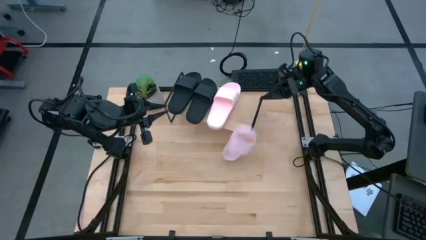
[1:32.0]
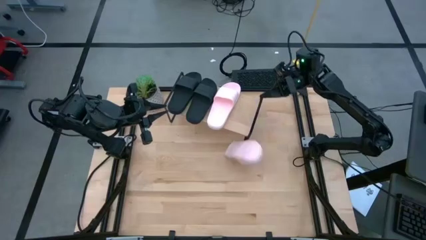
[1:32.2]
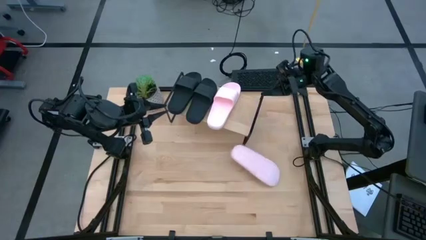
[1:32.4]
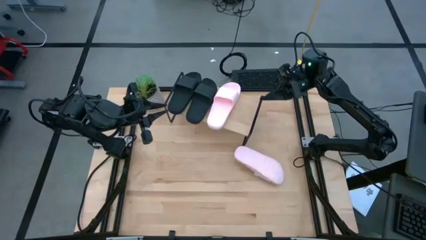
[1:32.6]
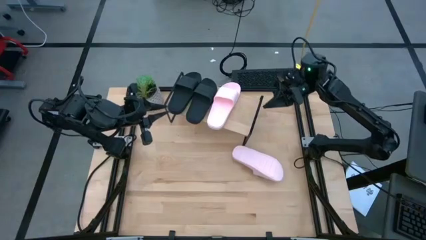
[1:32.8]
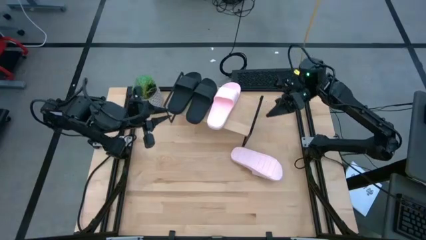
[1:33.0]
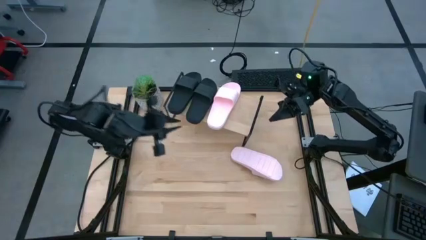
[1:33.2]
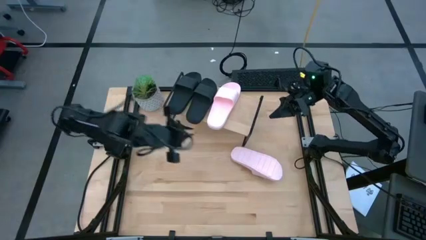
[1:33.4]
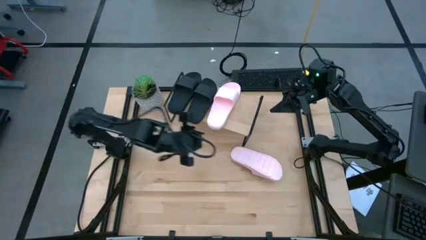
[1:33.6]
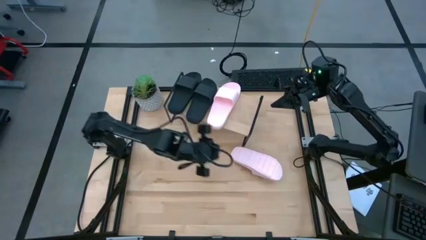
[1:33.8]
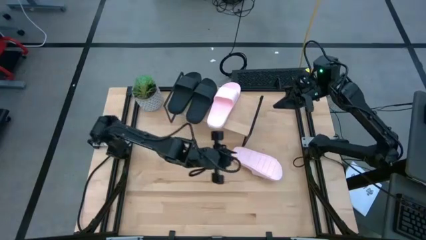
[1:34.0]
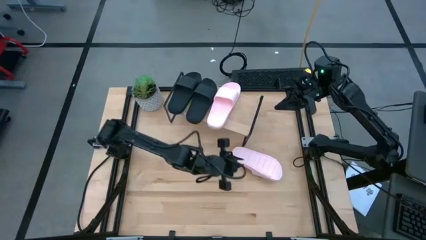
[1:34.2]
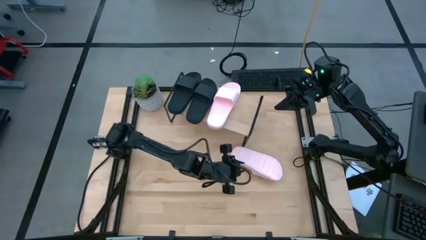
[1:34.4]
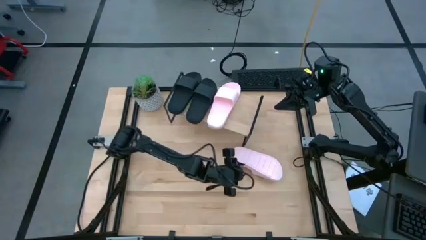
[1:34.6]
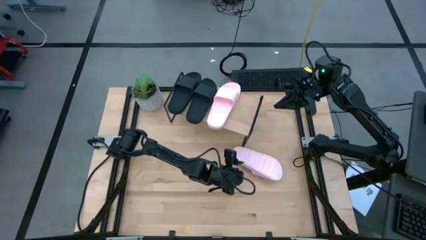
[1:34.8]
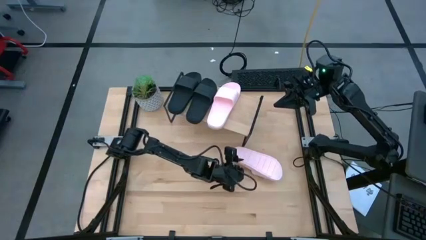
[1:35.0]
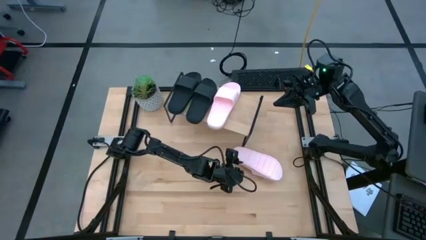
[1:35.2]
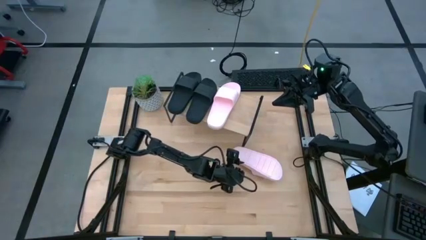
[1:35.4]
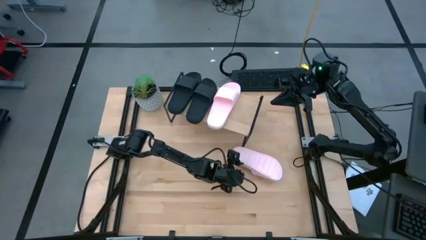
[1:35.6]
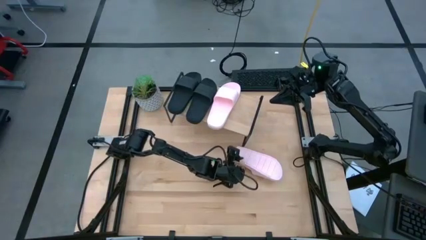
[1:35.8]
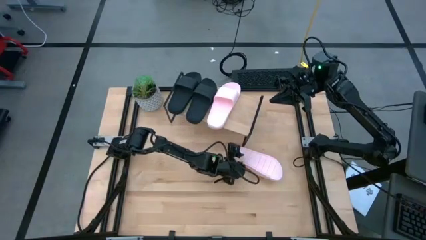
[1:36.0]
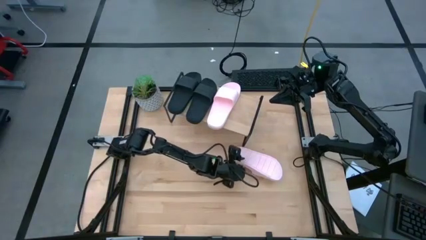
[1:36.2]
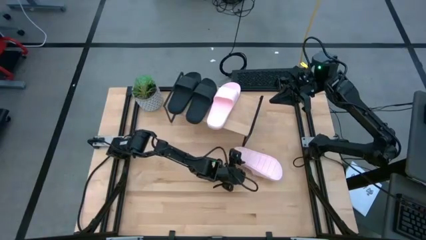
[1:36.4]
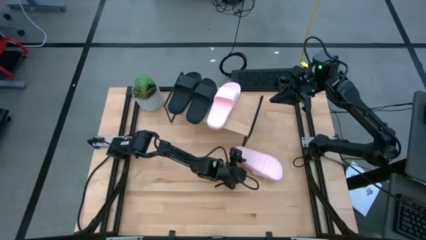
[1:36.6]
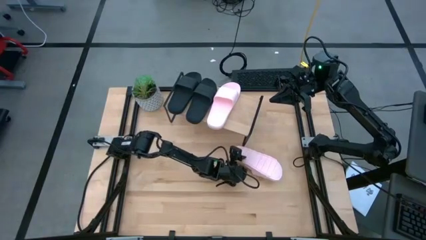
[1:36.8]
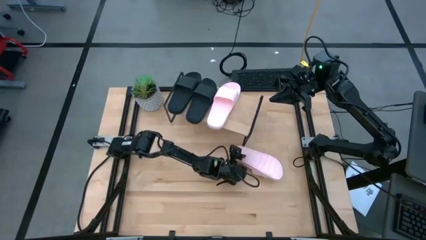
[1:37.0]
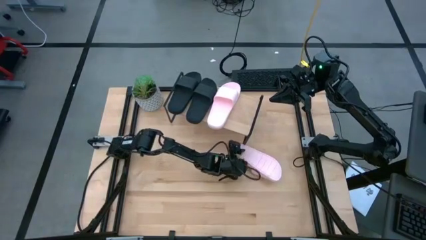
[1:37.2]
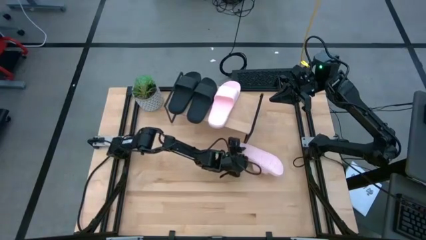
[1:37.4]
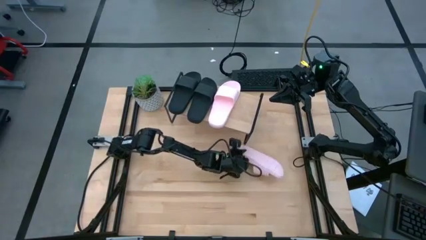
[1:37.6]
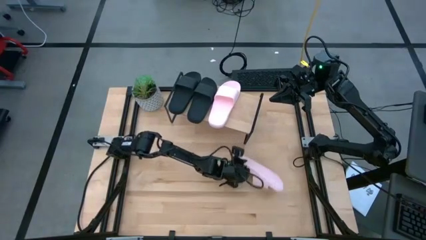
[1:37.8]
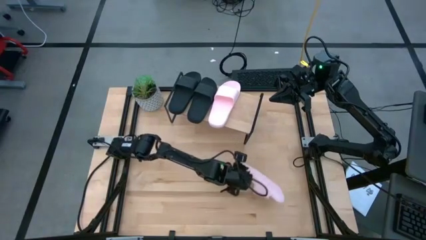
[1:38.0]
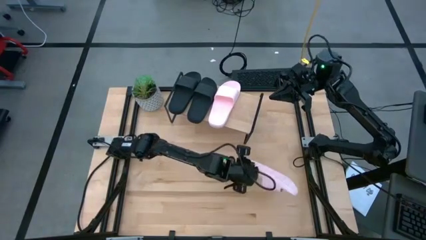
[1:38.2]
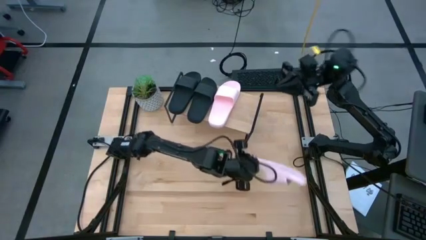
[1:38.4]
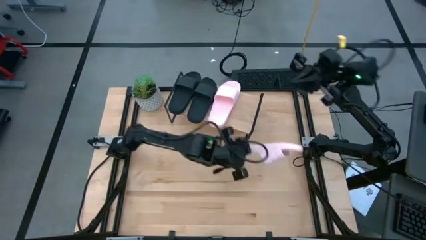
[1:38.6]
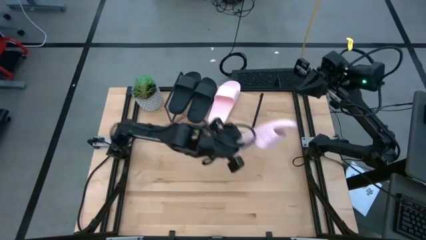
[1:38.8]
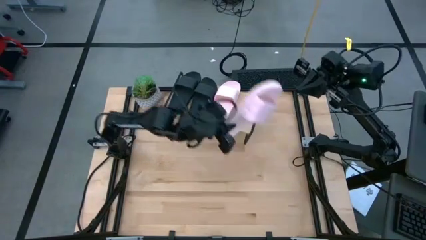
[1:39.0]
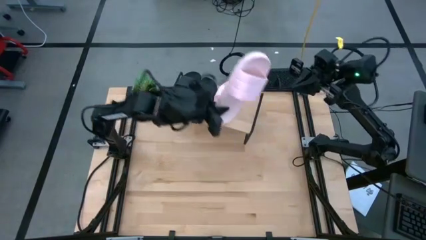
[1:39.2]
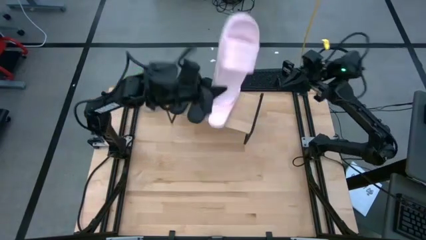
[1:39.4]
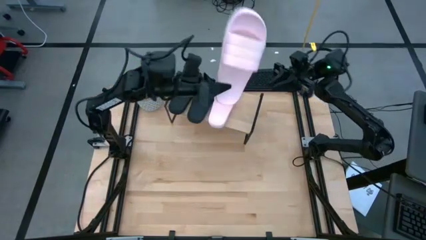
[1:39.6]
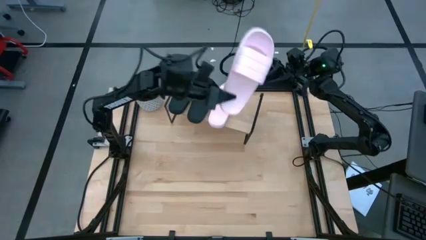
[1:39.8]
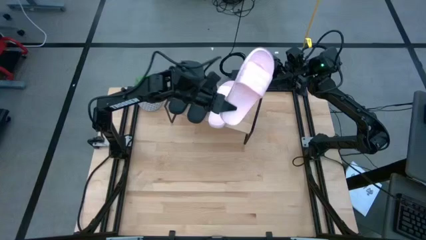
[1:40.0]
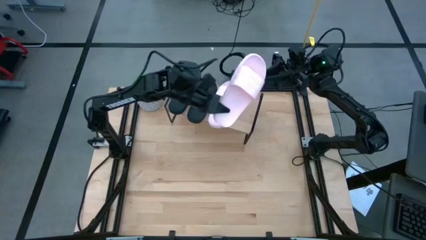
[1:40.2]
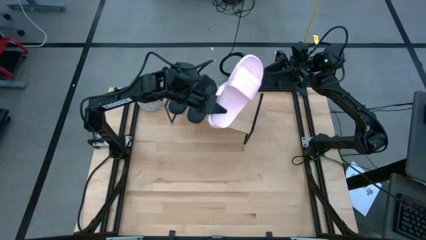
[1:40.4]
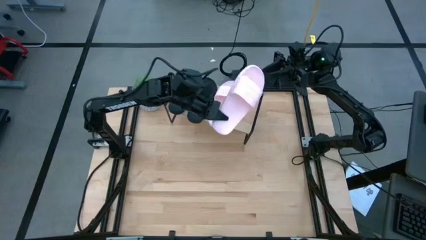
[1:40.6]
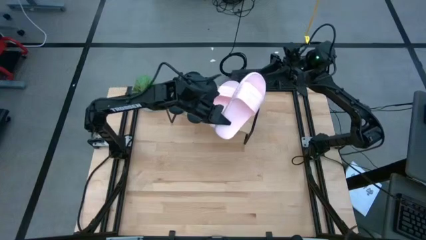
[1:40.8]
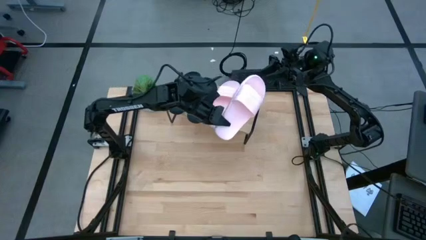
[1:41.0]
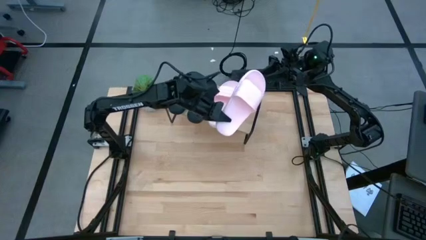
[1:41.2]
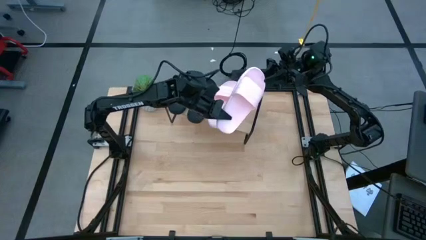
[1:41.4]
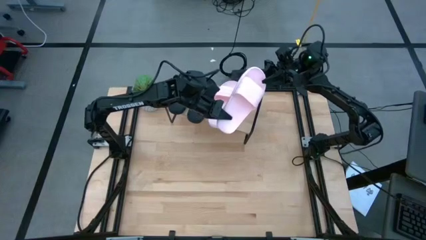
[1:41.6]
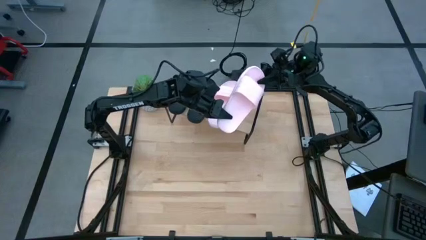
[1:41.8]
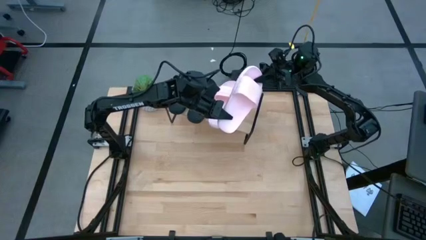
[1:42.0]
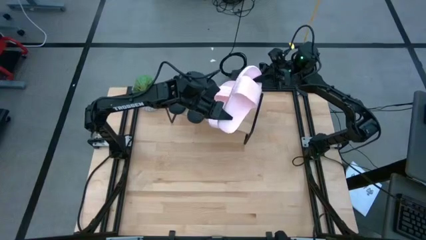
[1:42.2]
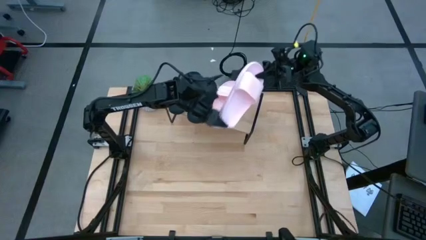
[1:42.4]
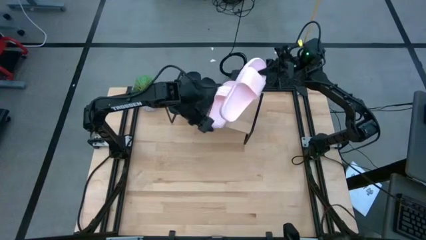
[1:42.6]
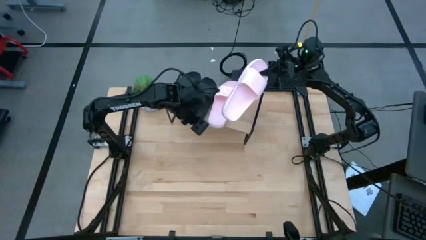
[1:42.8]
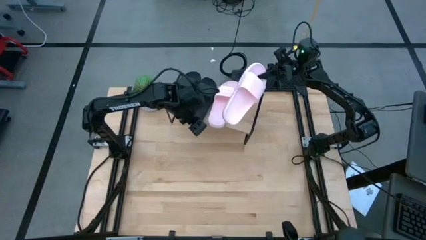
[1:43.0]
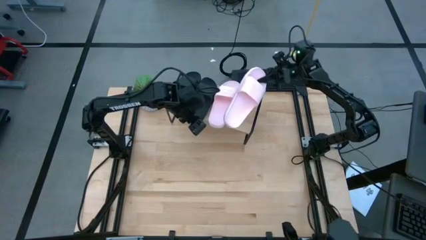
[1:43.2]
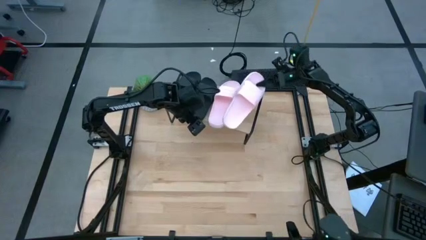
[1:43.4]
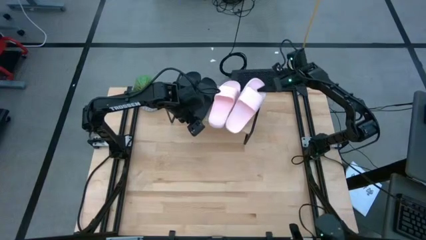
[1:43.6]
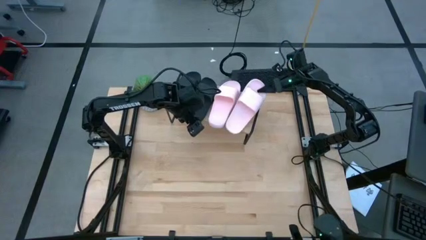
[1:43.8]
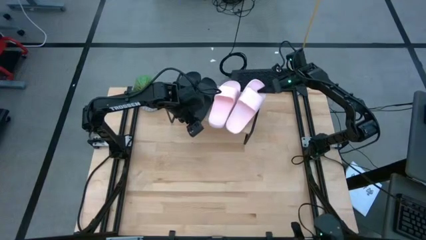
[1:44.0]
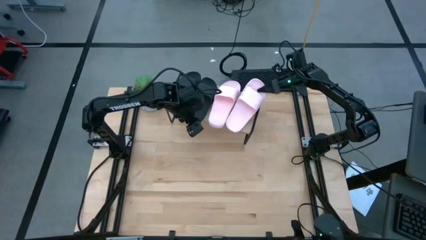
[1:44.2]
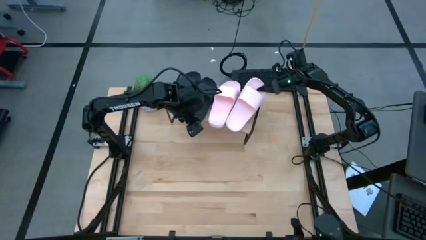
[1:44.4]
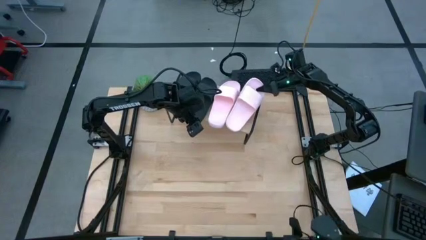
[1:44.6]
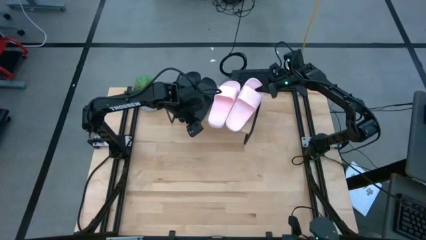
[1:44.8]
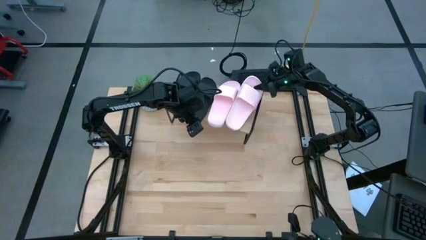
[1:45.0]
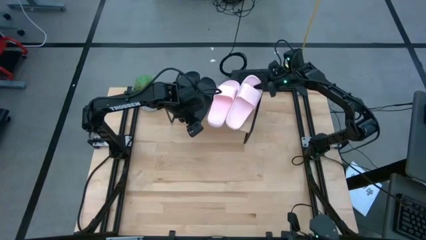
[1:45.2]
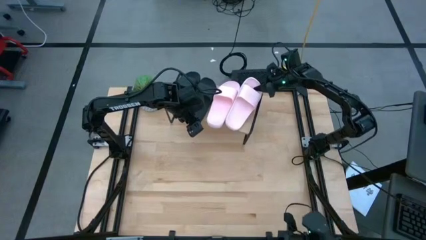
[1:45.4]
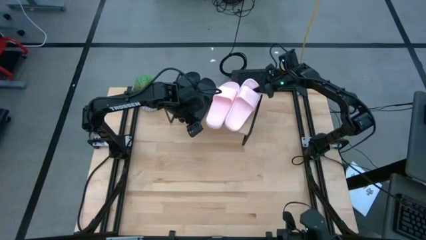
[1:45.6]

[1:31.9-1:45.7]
Task: Pick and place slides into the shelf
Put the pink slipper on the shelf

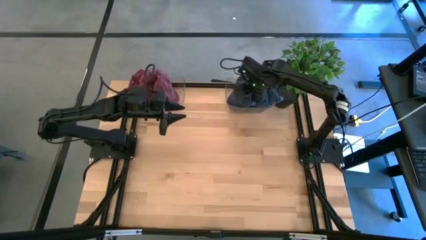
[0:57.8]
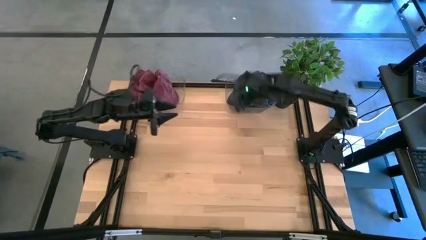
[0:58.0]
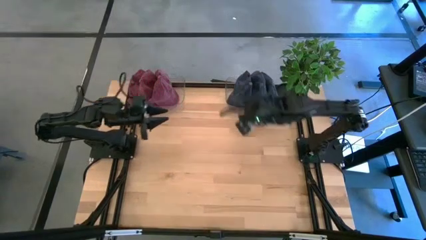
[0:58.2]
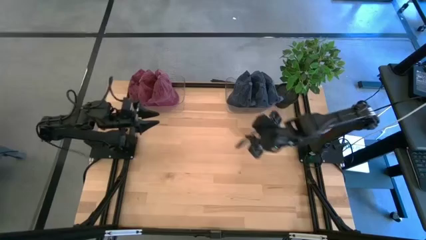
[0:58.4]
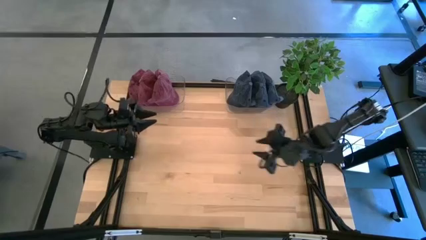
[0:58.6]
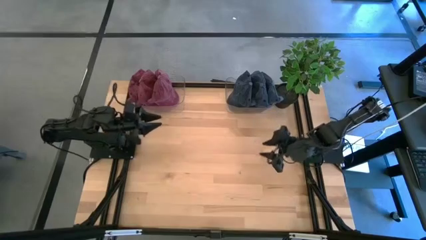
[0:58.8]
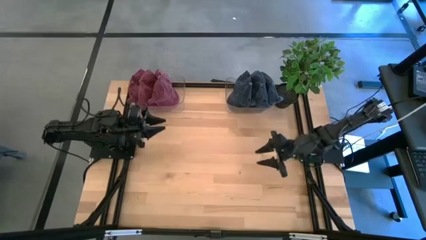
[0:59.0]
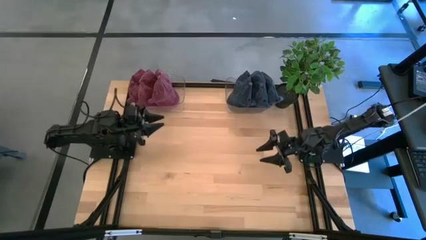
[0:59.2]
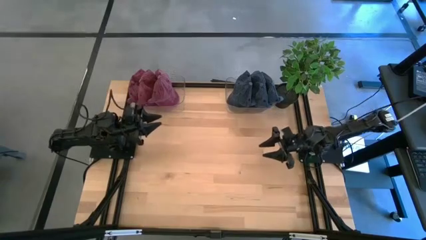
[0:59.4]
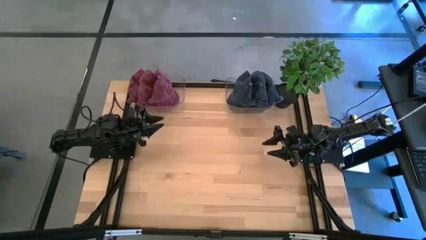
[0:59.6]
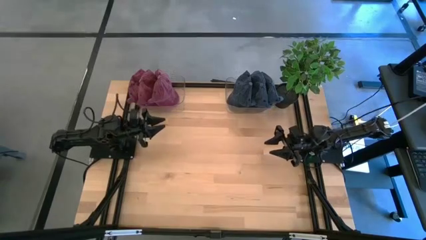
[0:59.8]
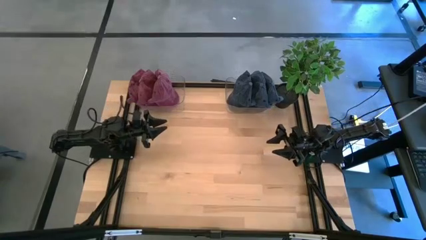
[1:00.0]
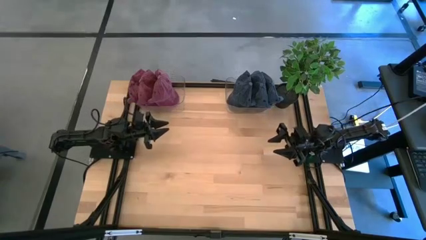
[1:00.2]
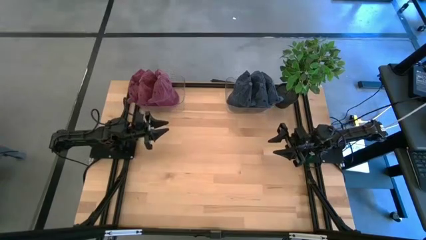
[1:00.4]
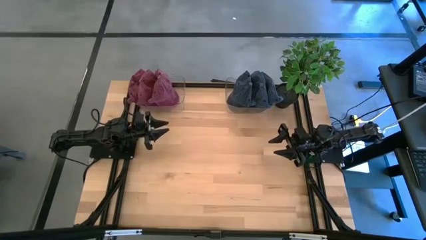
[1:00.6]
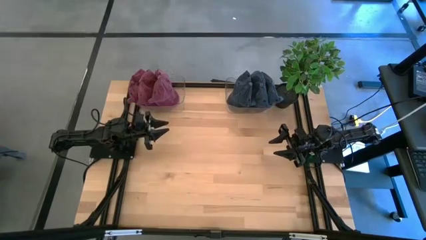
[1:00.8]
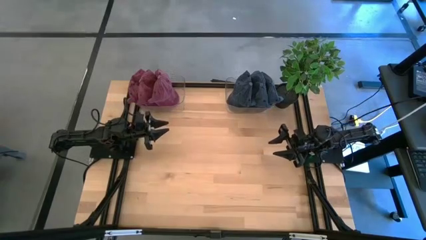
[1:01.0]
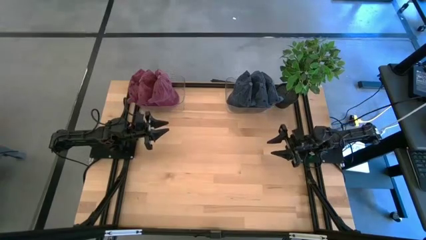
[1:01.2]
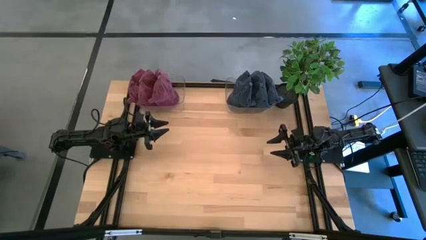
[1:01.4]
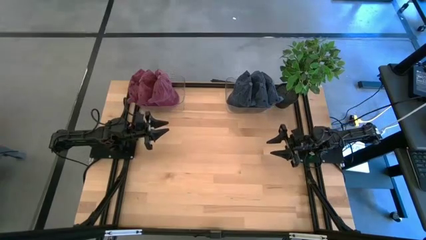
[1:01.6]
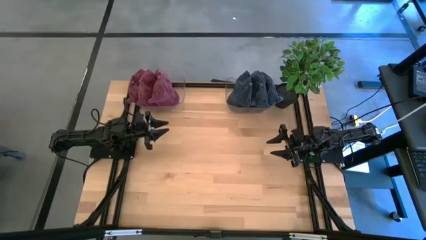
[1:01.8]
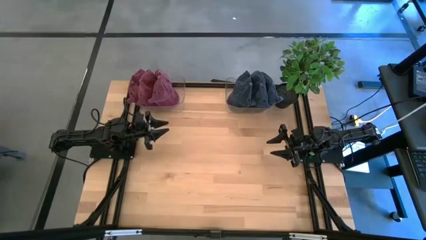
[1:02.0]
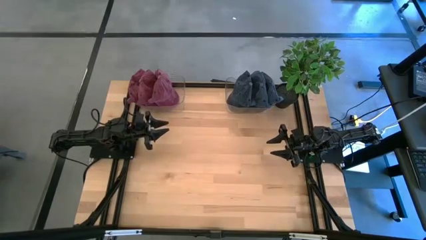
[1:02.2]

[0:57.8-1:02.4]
Task: Pick & Place hat
Return to Home Position
